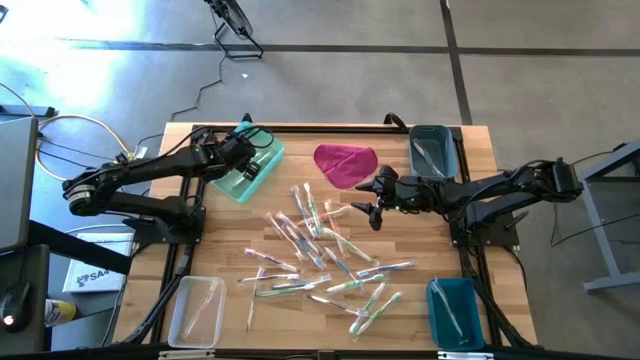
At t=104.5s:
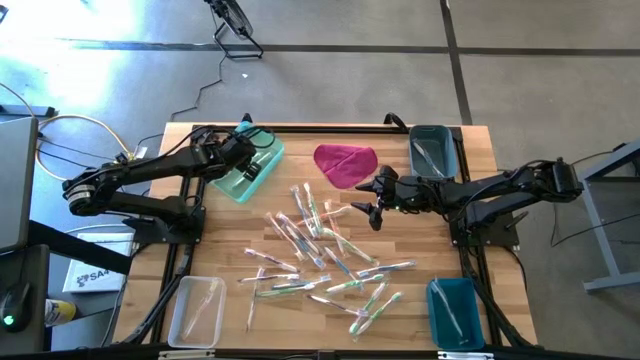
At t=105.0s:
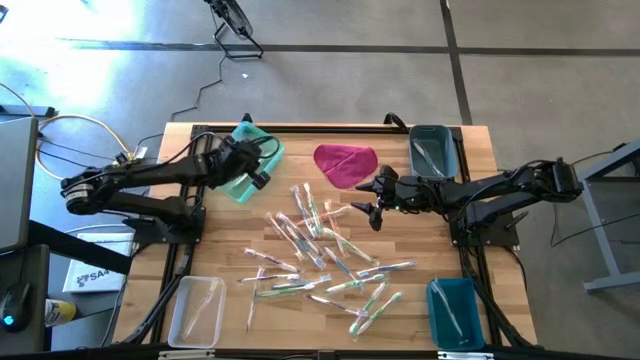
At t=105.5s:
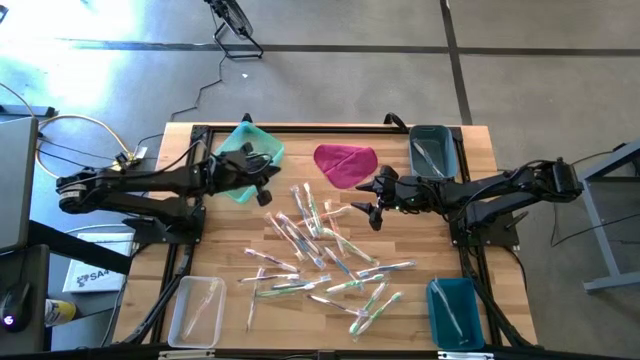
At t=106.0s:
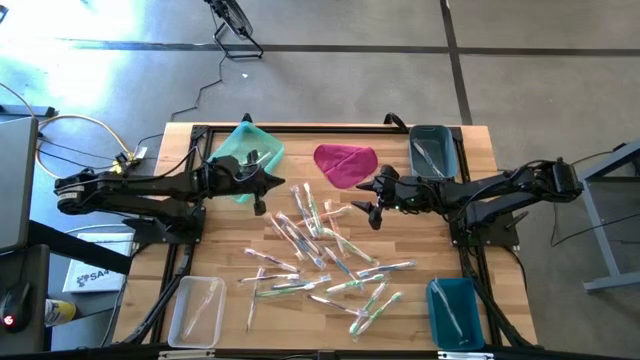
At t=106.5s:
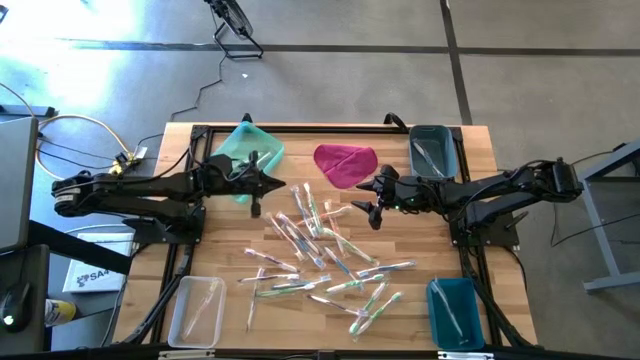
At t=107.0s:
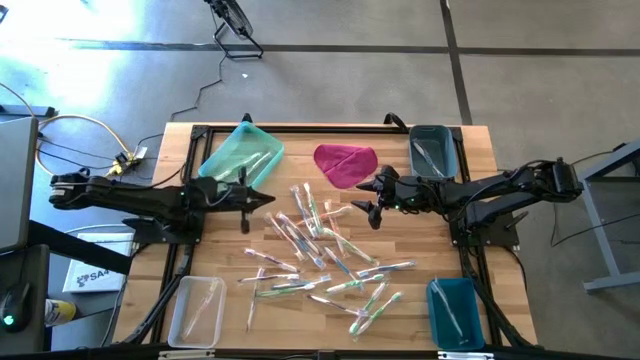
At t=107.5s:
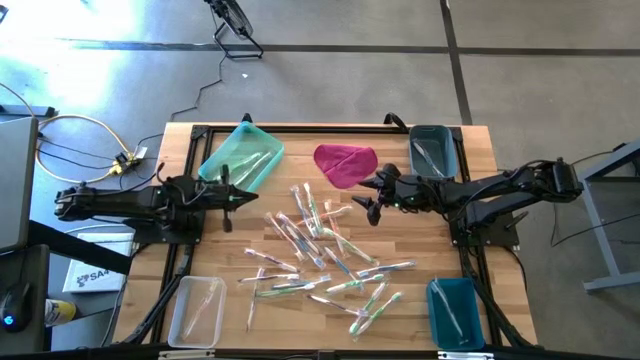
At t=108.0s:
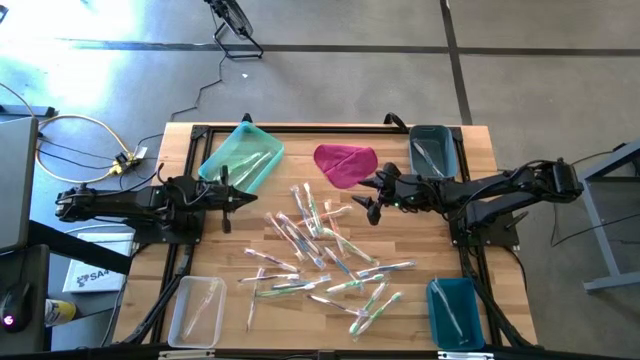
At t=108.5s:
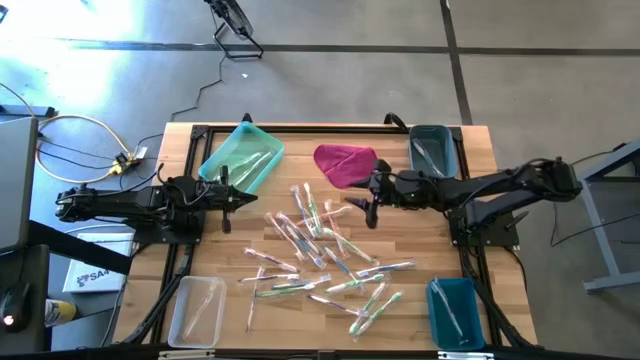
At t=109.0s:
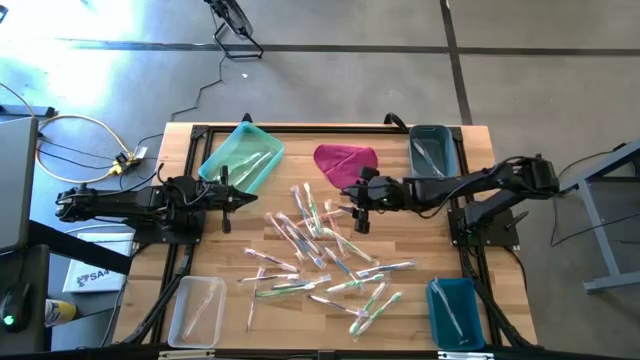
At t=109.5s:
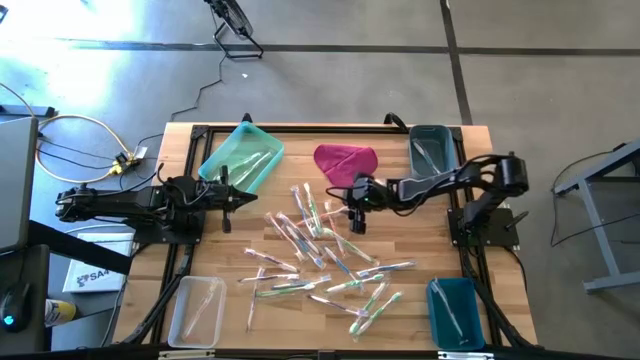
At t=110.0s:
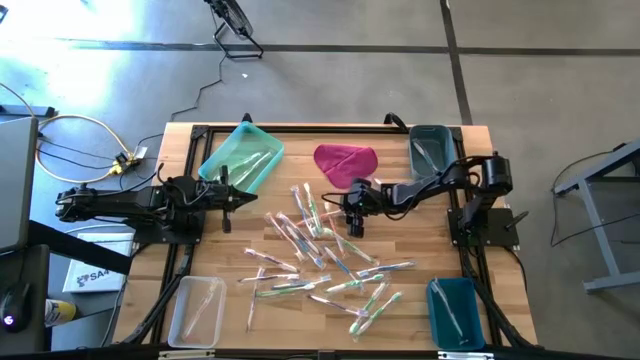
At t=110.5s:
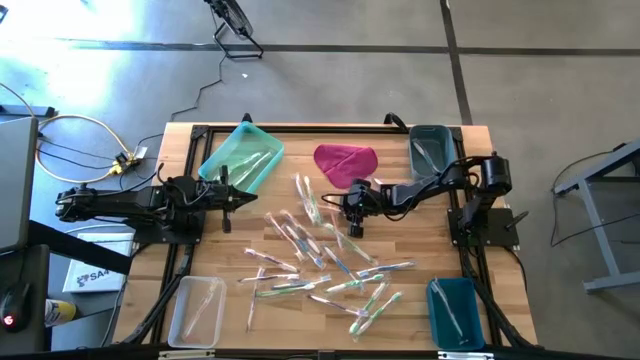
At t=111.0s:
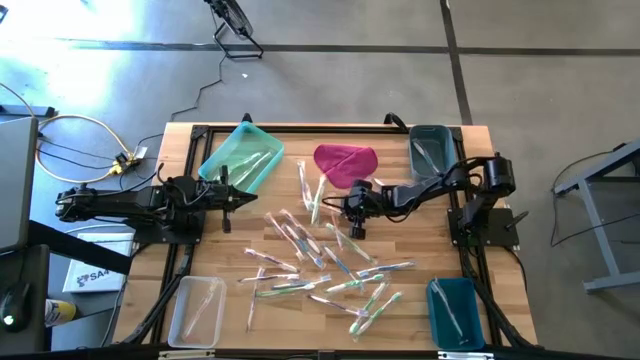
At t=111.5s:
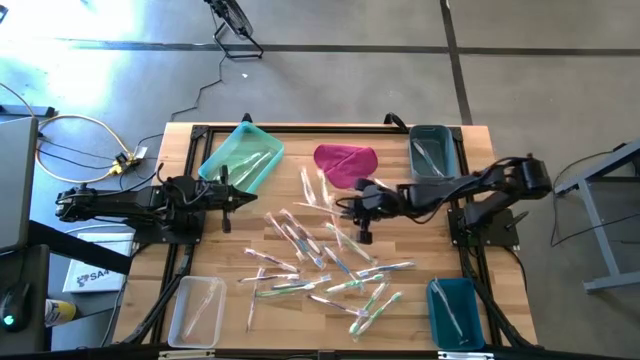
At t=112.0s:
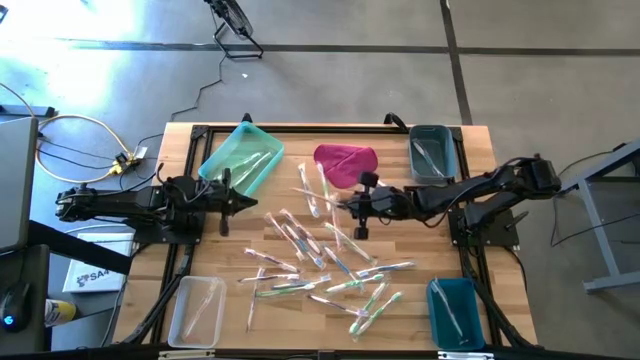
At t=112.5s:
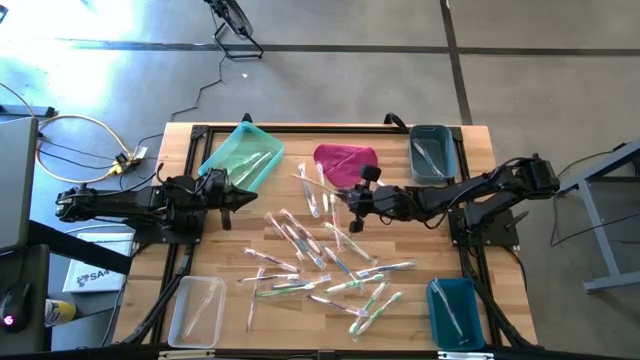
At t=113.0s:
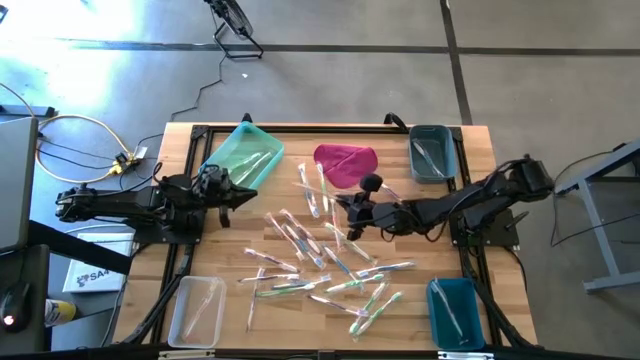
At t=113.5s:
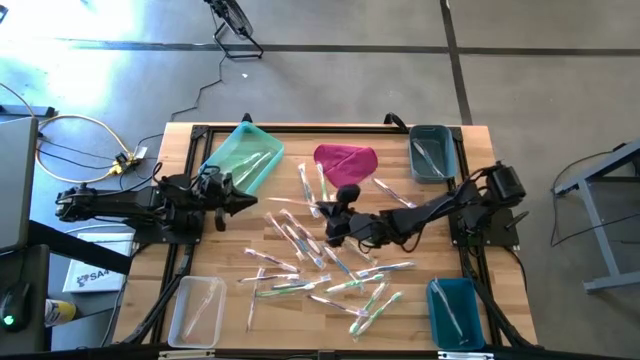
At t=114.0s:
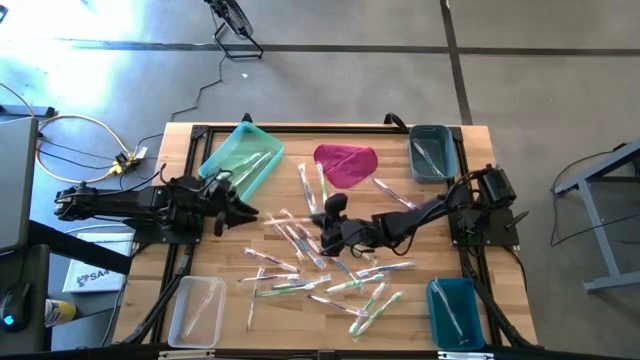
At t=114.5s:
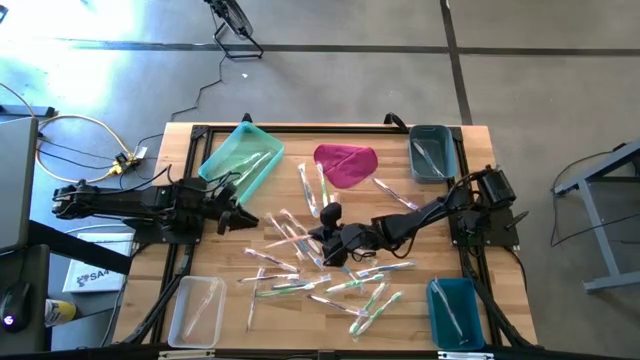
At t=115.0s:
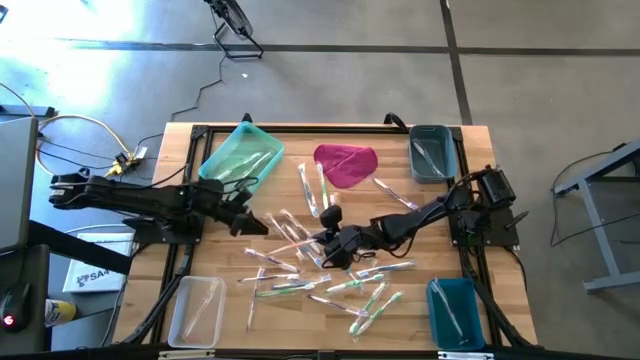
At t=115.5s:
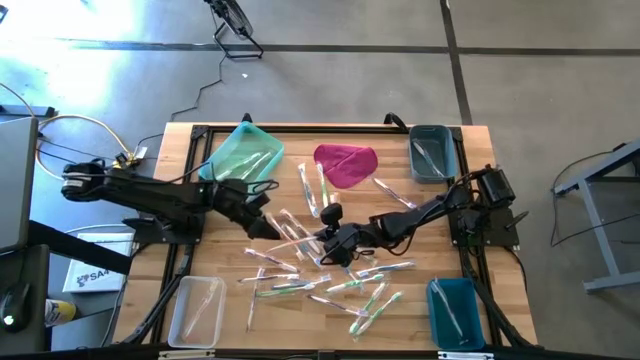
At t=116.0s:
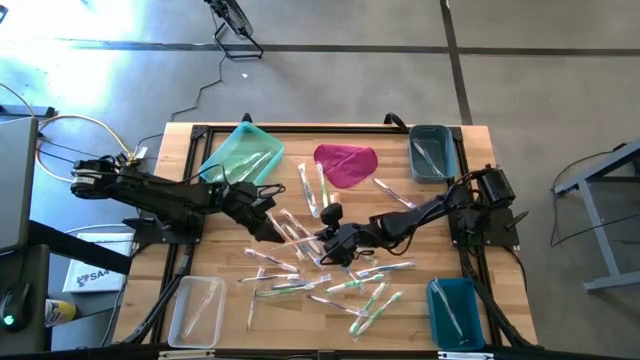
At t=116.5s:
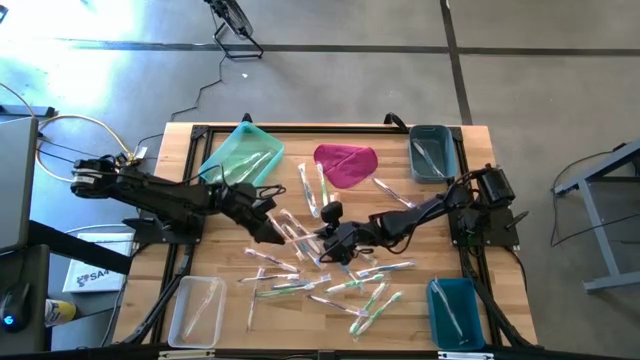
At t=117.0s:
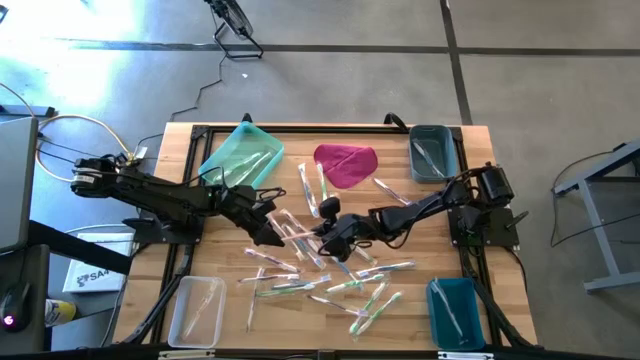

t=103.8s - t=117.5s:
Task: Pick & Place Toothbrushes
Put the orange toothbrush to the transparent bin

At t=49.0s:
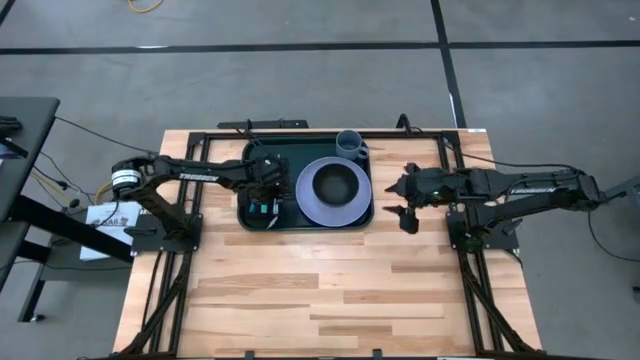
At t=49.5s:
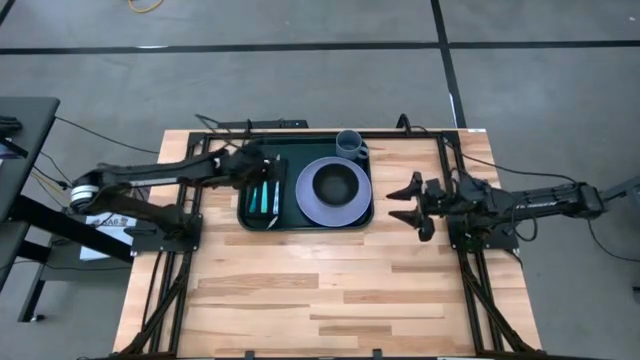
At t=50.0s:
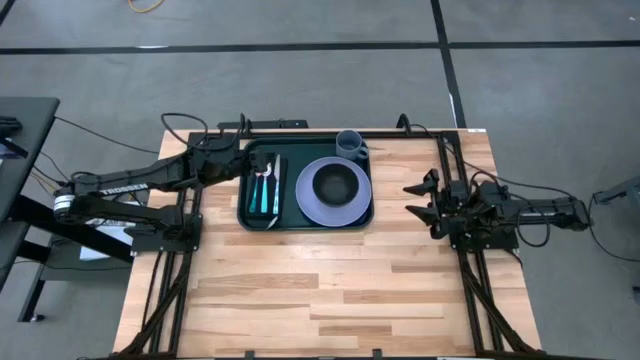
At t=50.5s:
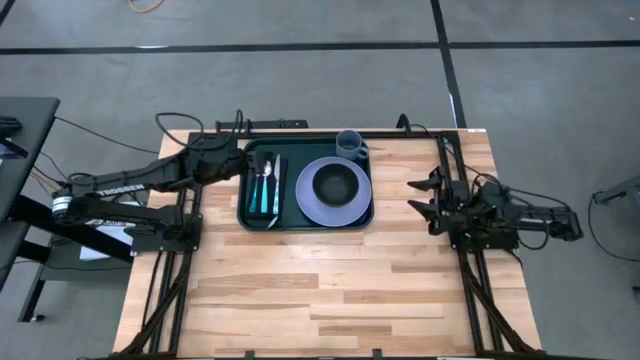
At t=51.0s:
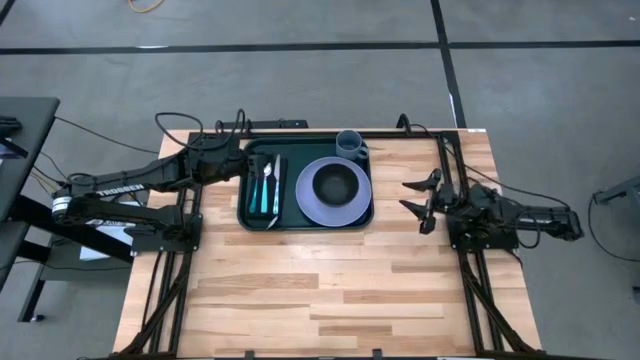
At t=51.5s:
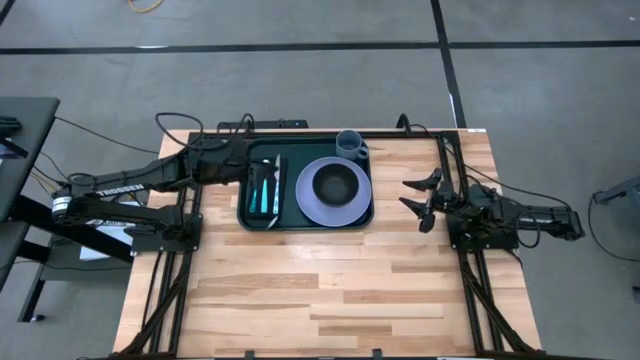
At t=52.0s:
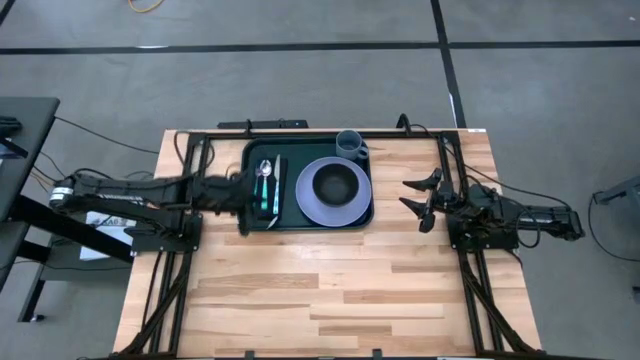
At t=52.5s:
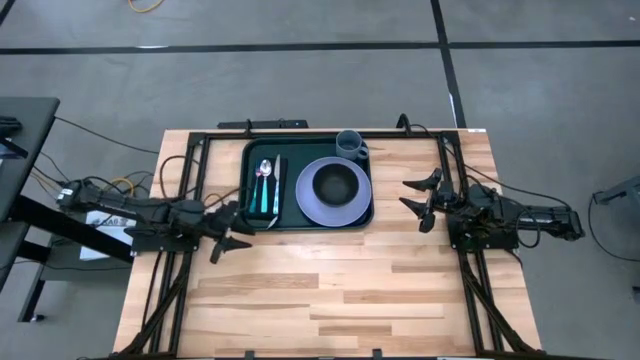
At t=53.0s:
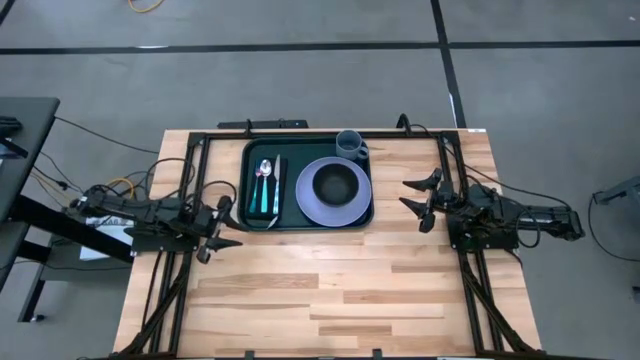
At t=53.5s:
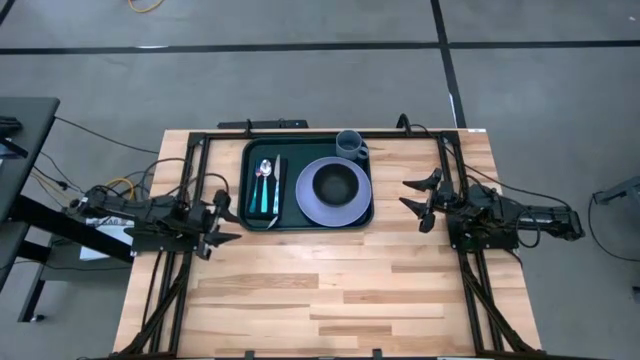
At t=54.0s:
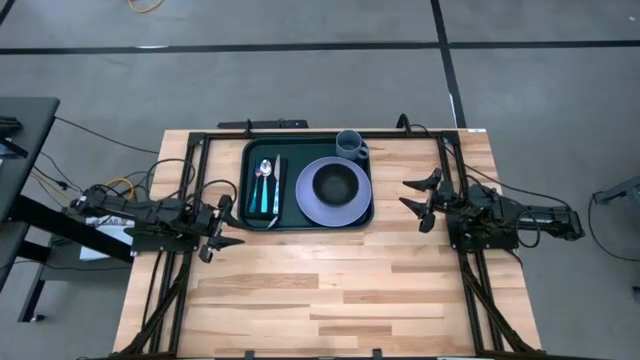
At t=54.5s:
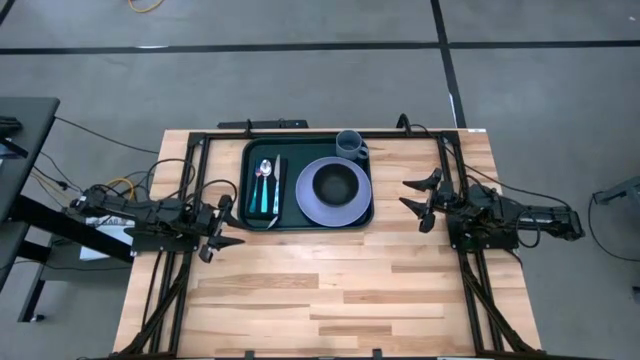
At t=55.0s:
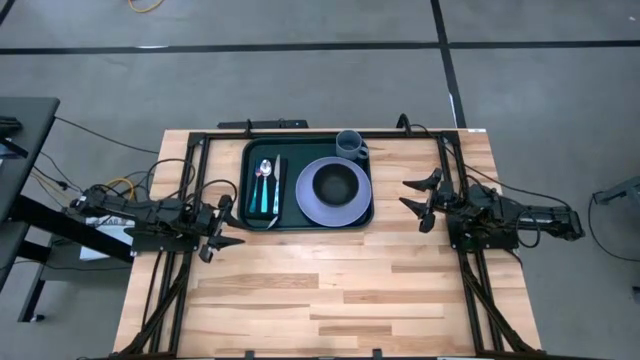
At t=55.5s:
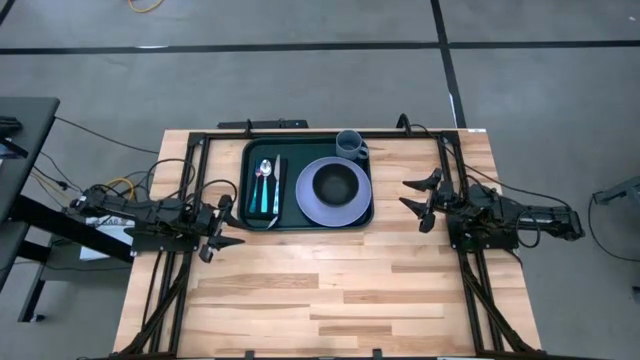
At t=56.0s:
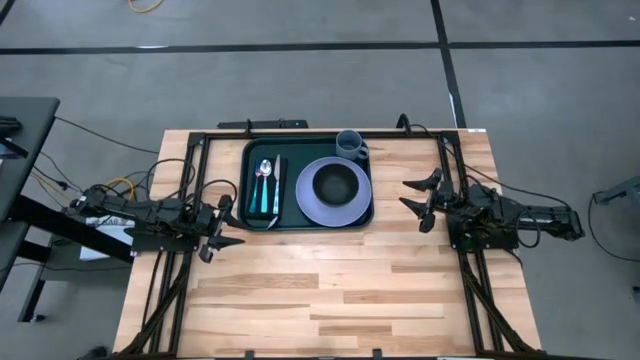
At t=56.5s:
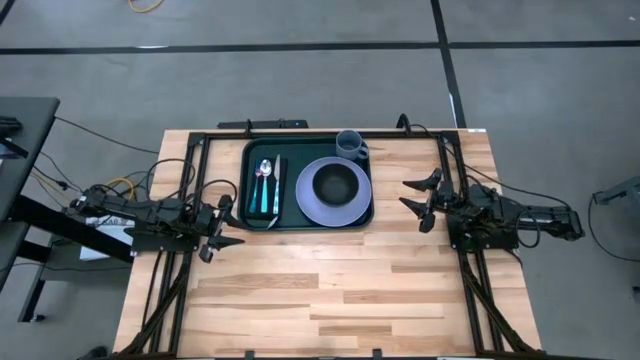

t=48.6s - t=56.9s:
Task: Set up tray
Return to Home Position
